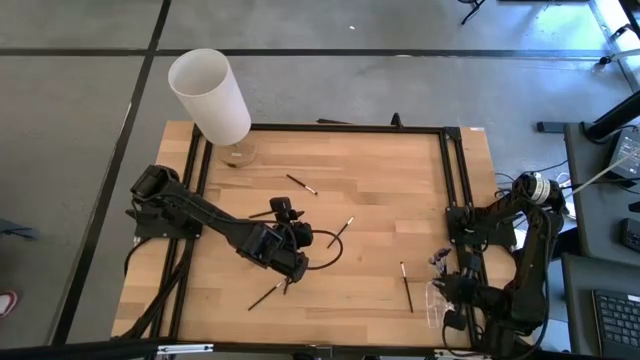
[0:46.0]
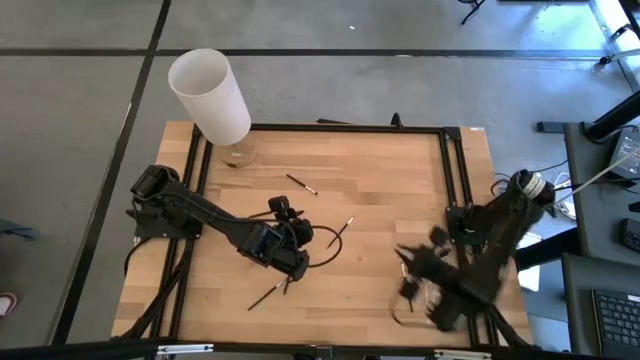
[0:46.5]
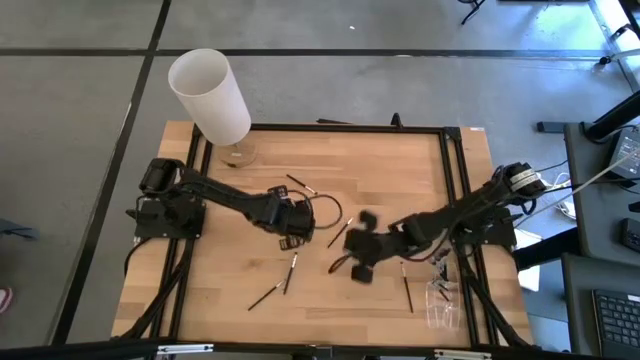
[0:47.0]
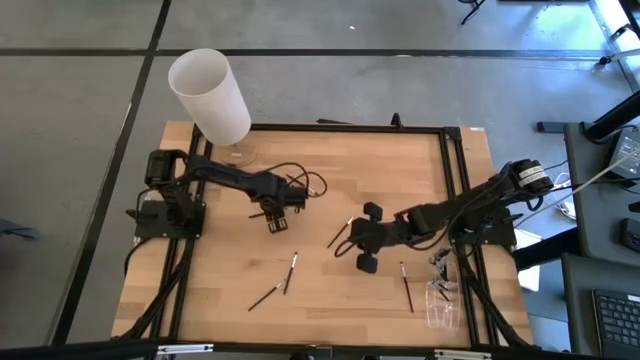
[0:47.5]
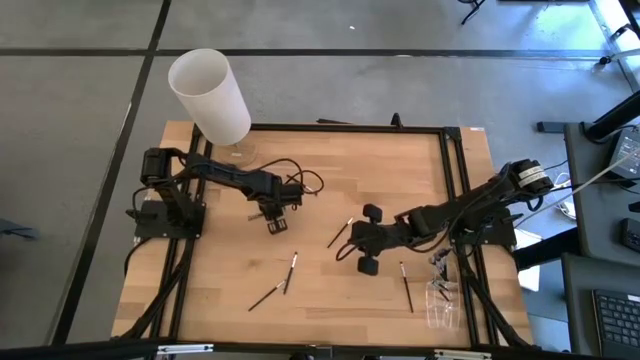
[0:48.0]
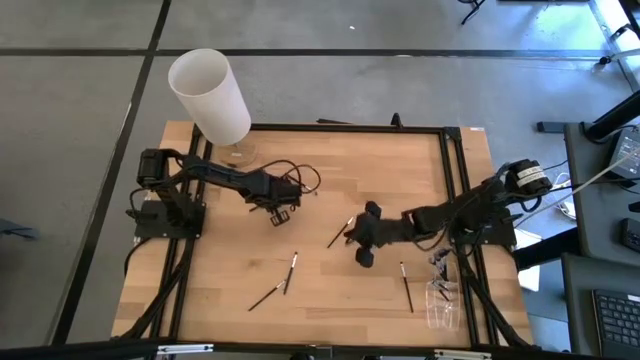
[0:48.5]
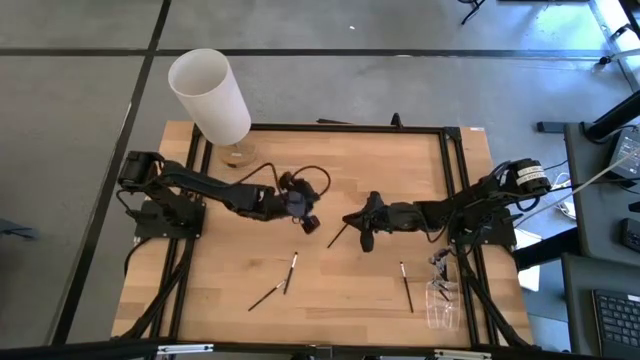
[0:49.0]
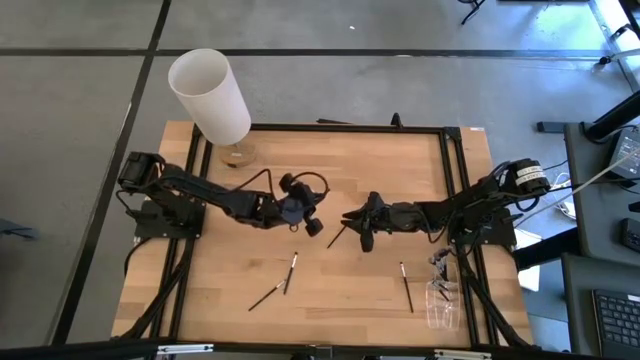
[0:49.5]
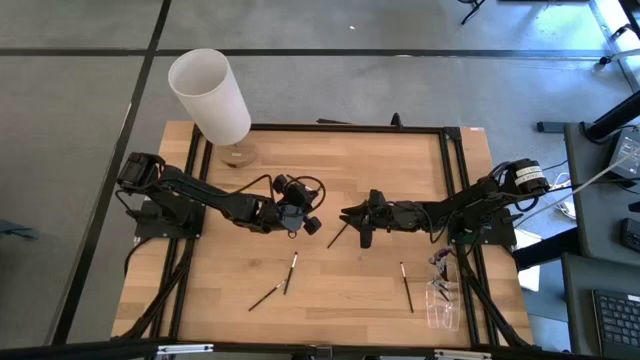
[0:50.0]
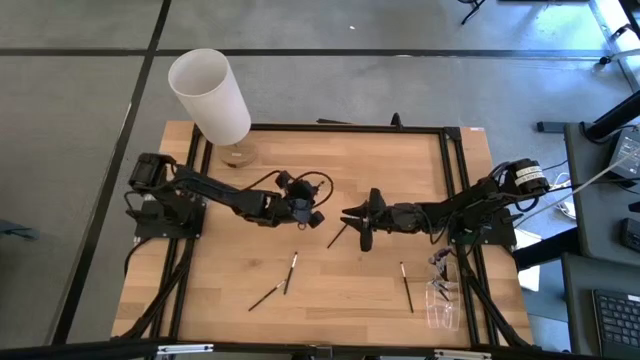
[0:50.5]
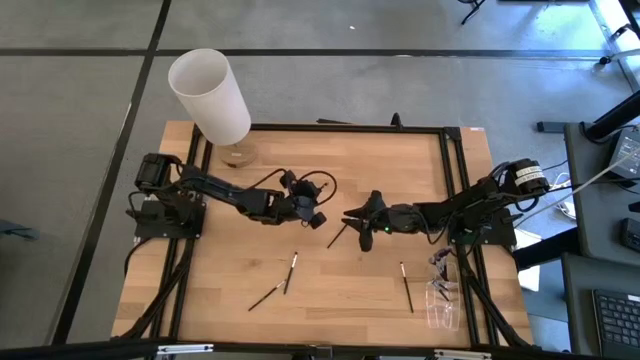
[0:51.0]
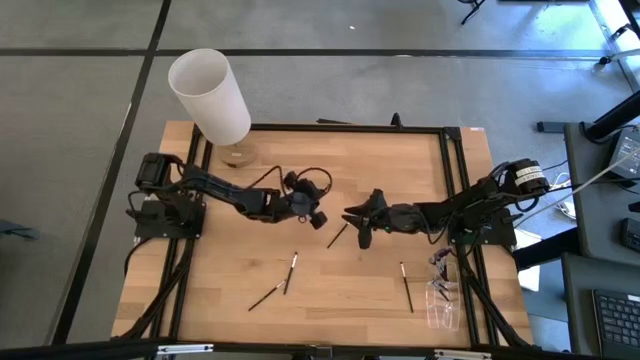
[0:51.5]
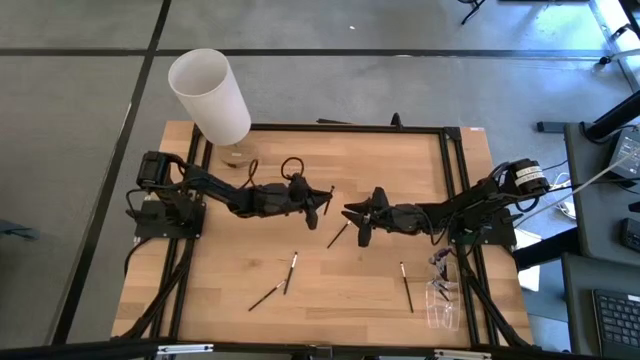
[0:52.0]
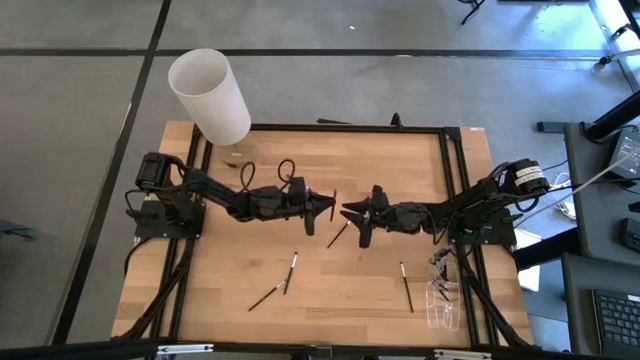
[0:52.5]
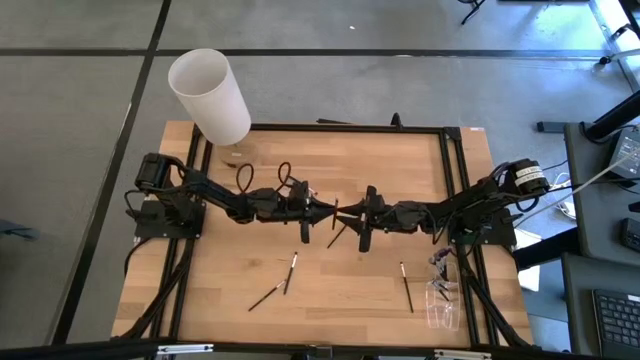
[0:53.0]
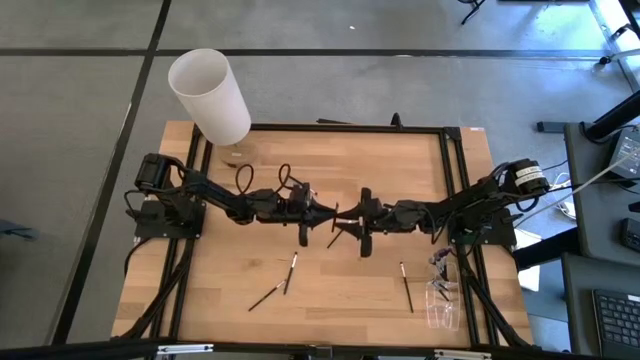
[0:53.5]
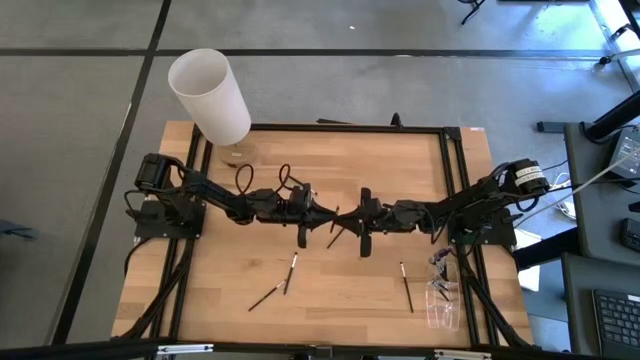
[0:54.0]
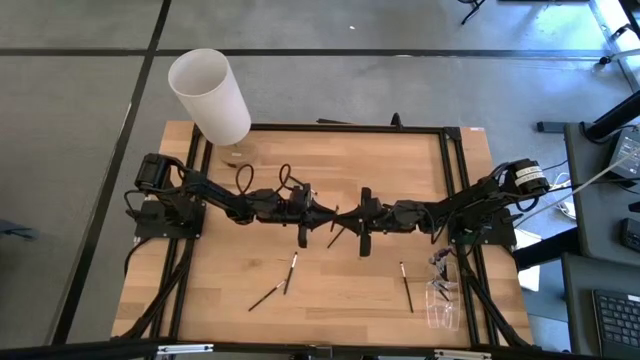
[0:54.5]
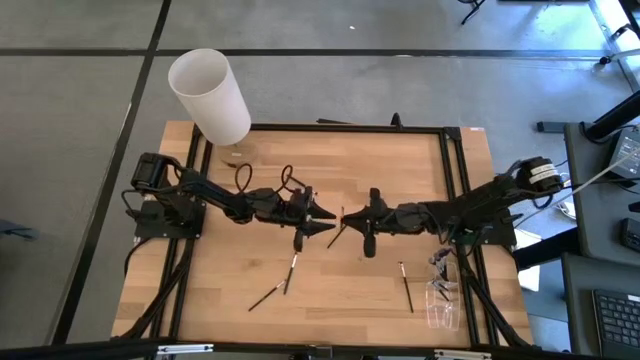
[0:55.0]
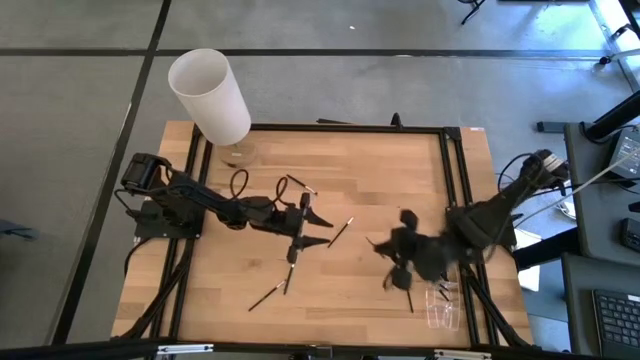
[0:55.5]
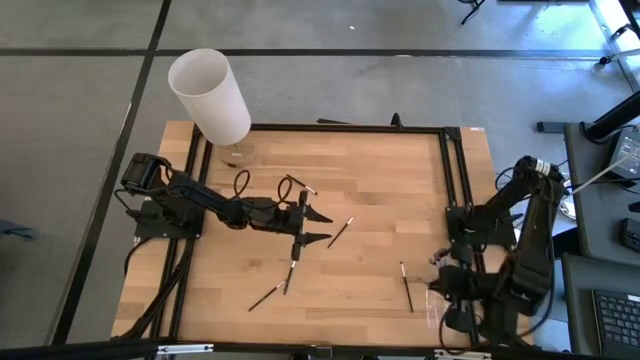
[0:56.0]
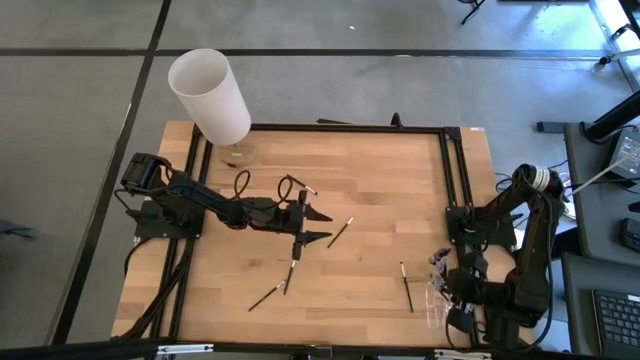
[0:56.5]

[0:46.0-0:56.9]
Task: Put items in baskets/containers
Put the eyeshadow brush into the transparent organizer

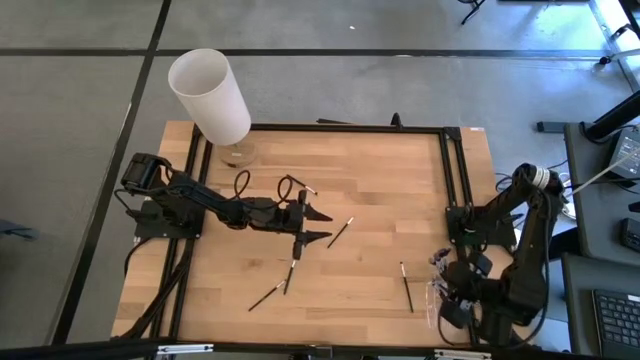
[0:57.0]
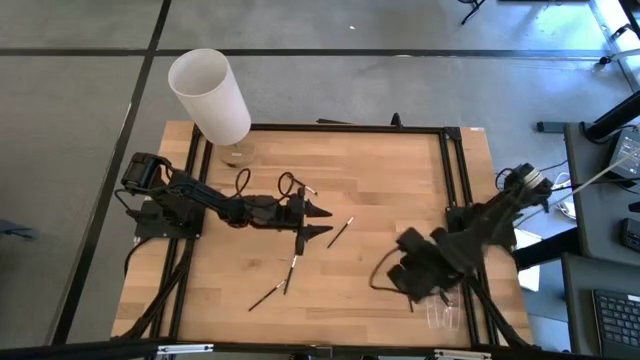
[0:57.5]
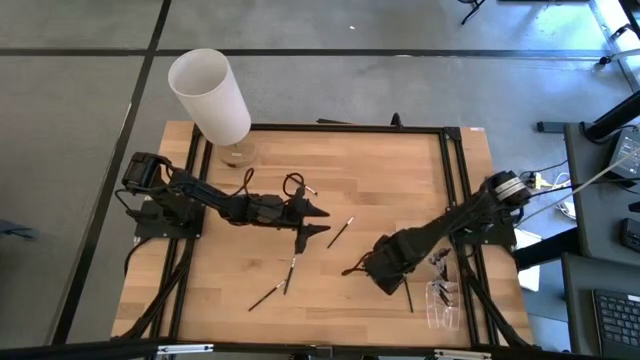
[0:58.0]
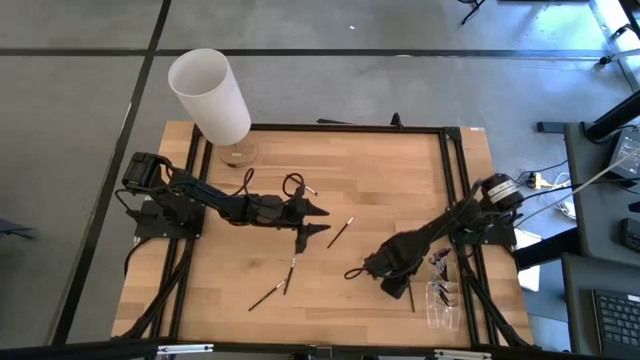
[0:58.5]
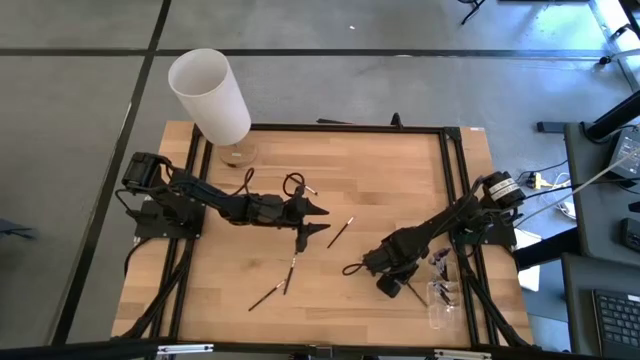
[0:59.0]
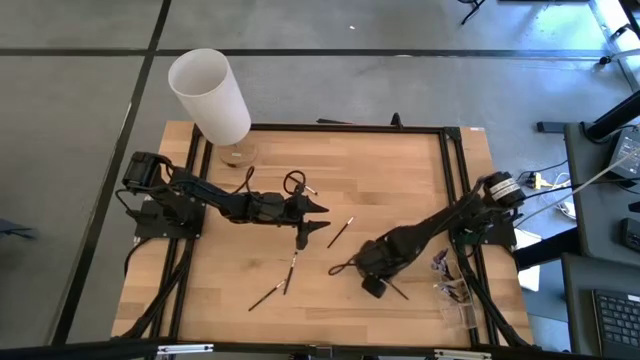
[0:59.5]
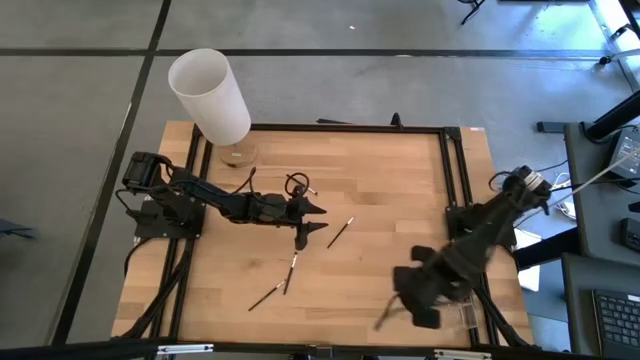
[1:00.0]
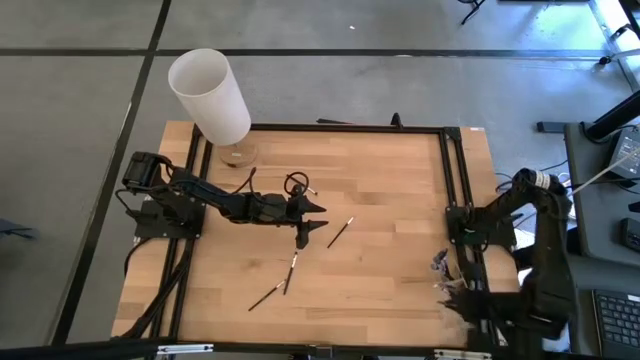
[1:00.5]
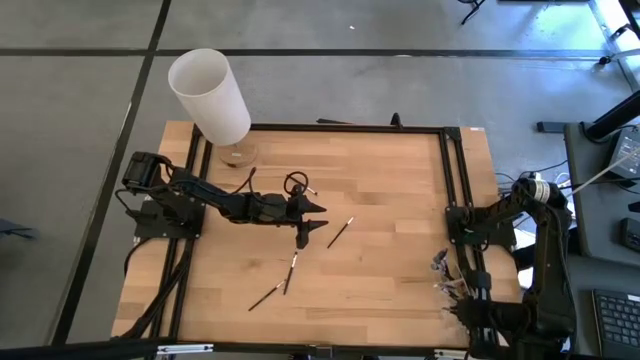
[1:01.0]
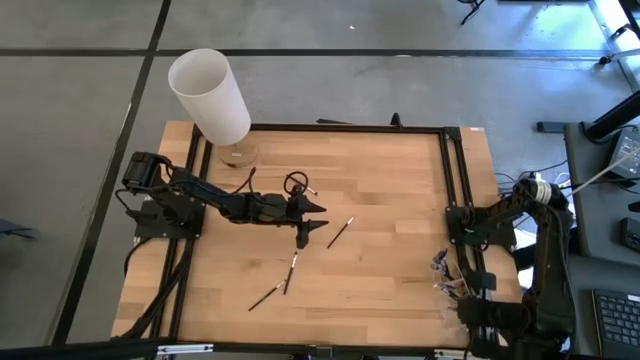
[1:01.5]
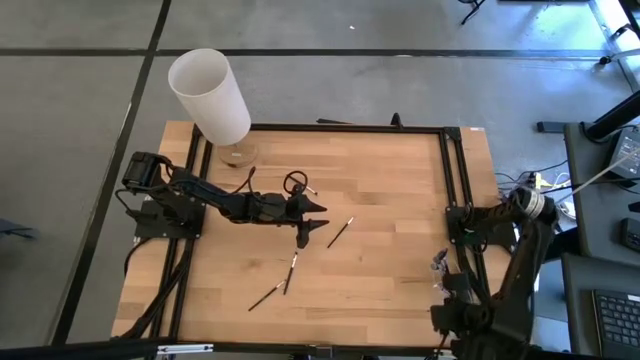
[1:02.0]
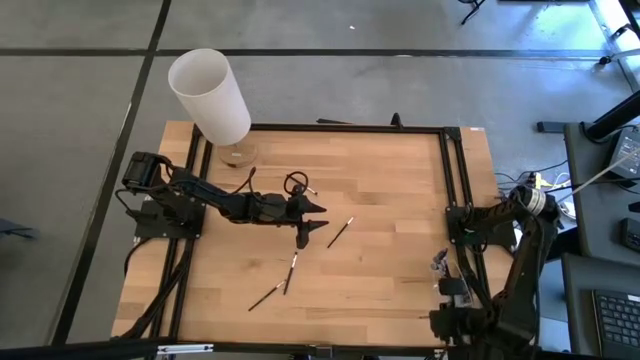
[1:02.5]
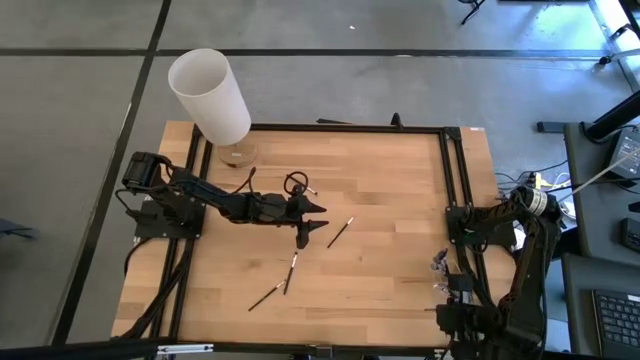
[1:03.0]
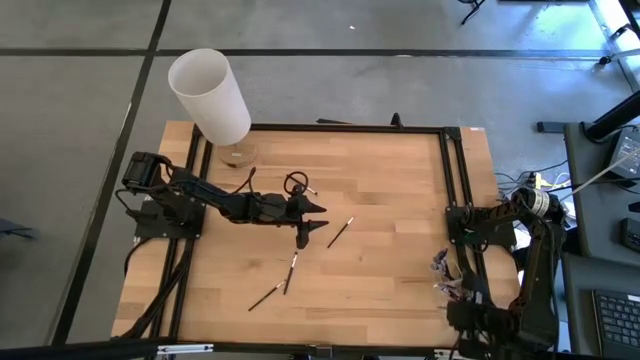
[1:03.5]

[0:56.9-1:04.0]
Put the eyeshadow brush into the transparent organizer

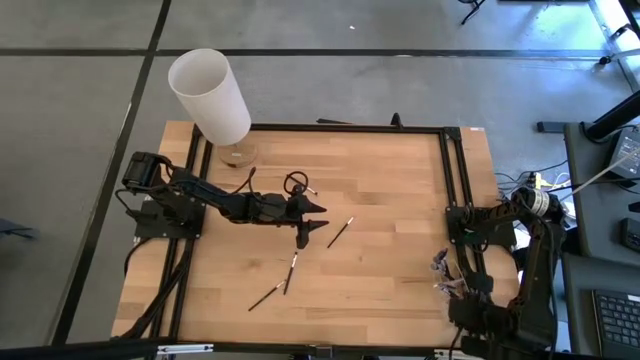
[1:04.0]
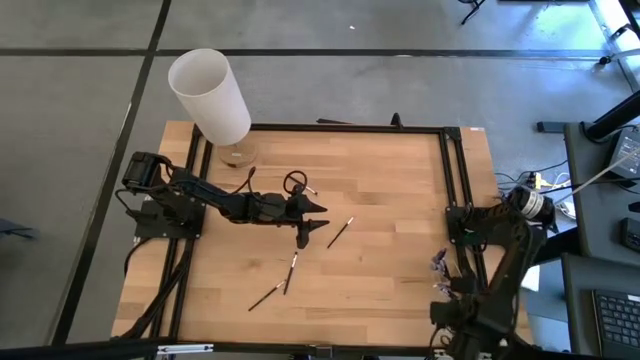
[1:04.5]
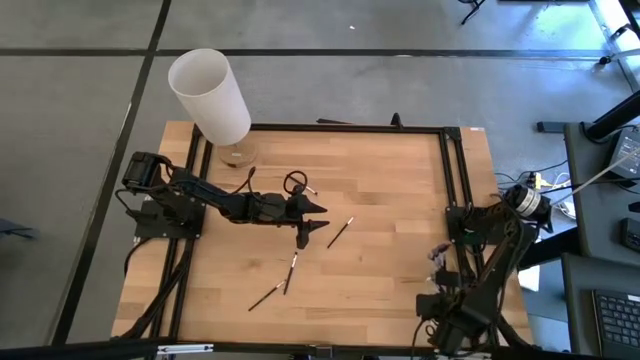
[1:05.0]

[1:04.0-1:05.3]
Adjust the transparent organizer on the table

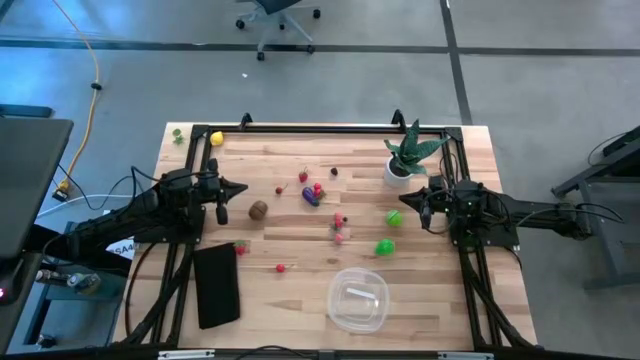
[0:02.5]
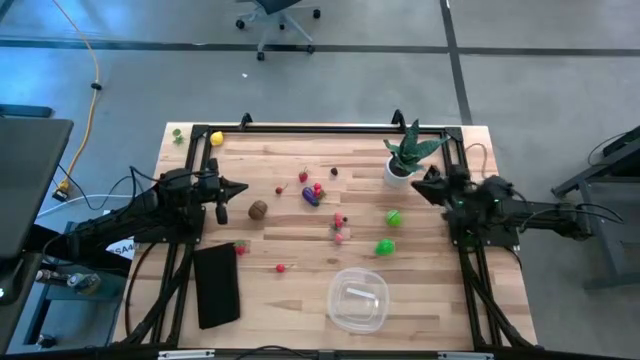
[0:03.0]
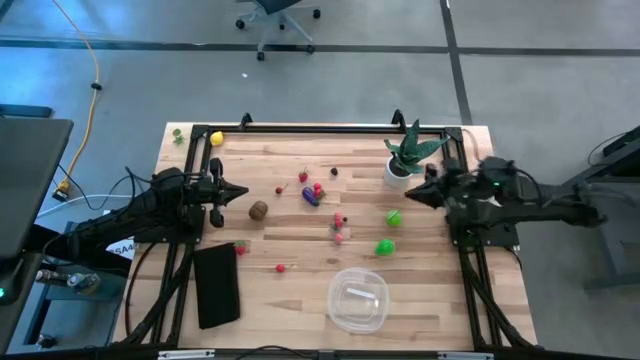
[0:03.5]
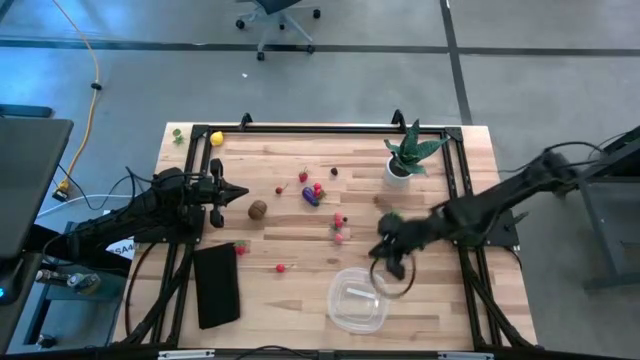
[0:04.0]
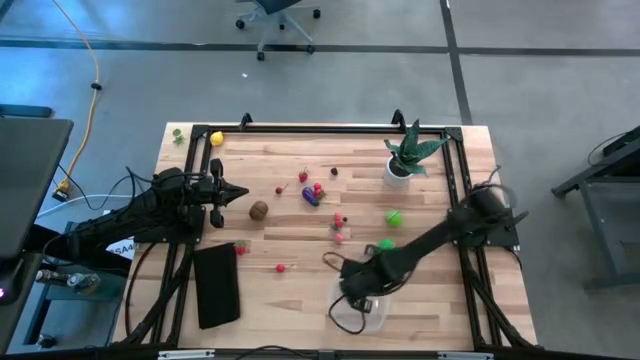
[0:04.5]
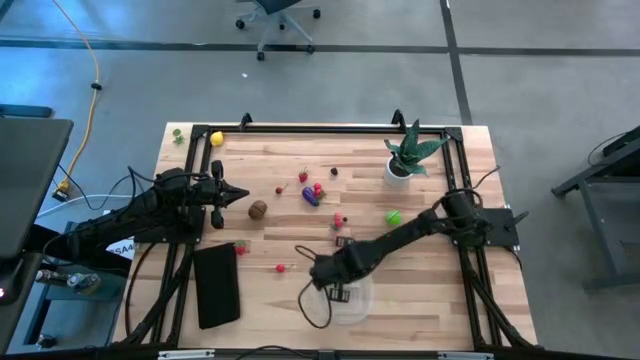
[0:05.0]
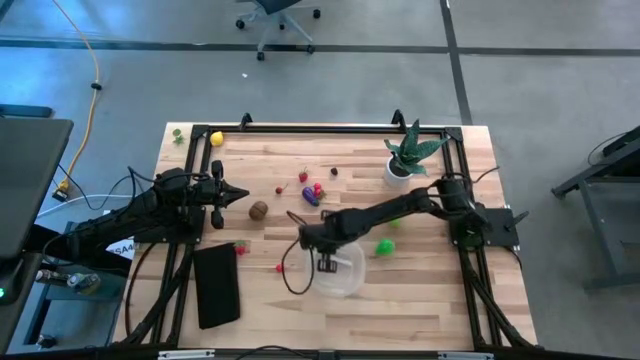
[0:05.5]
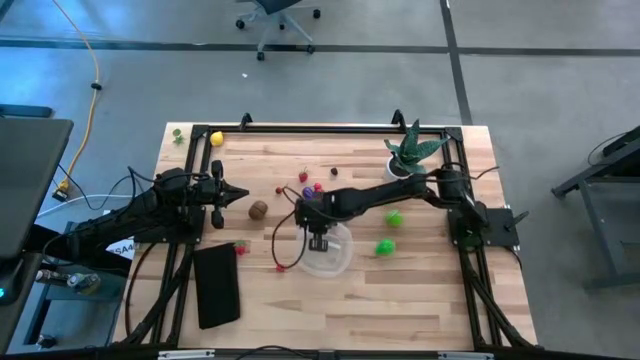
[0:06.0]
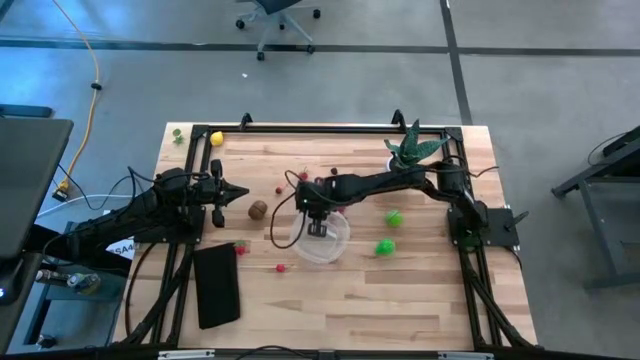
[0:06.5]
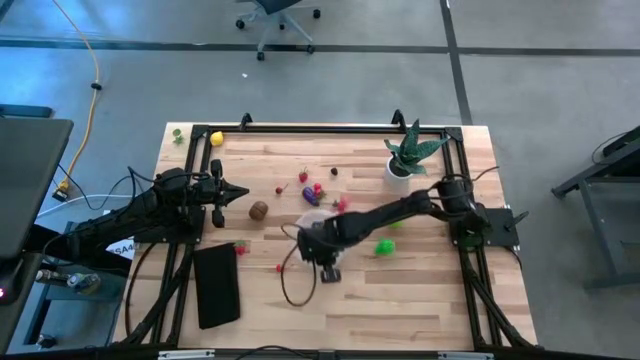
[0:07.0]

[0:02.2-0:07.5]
Task: Pick and placing Produce into tupperware
Move the transparent container to the center of the table
